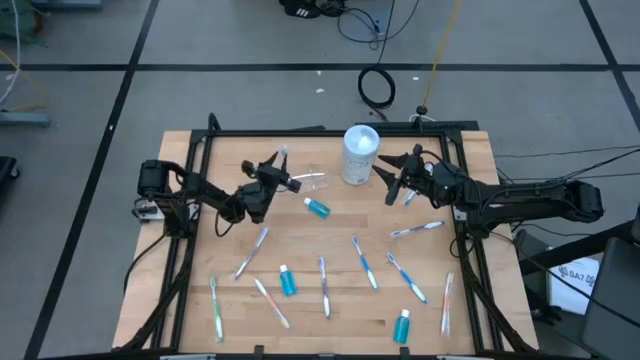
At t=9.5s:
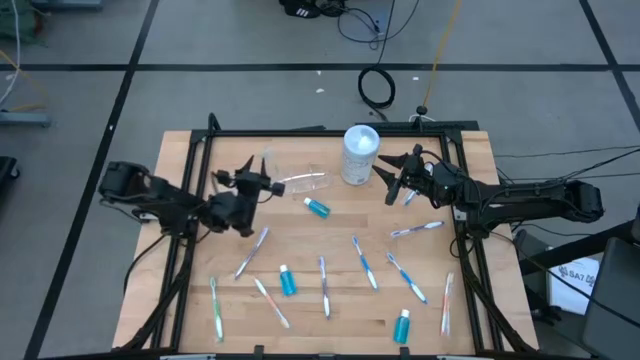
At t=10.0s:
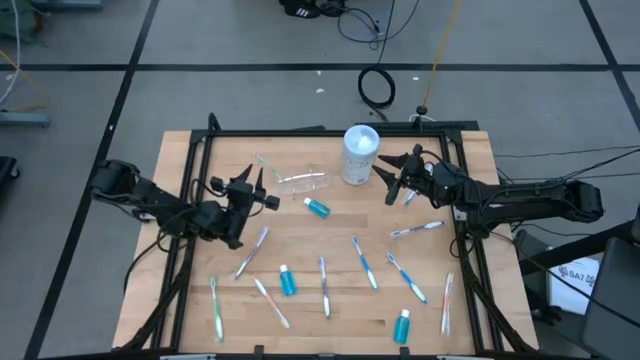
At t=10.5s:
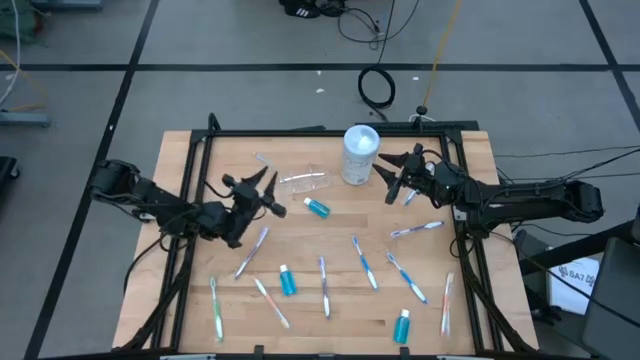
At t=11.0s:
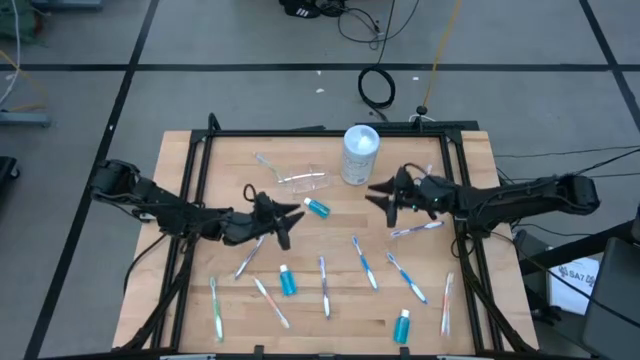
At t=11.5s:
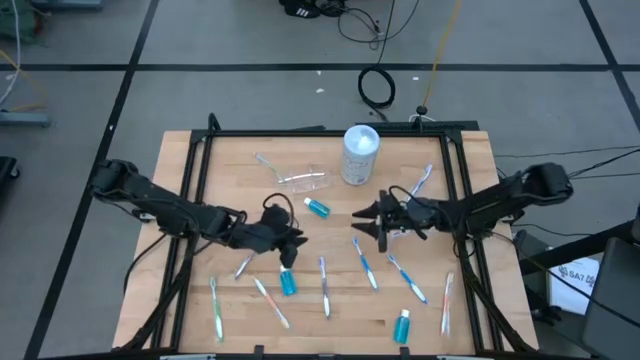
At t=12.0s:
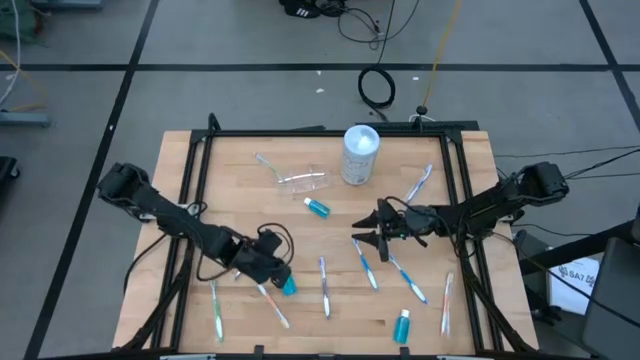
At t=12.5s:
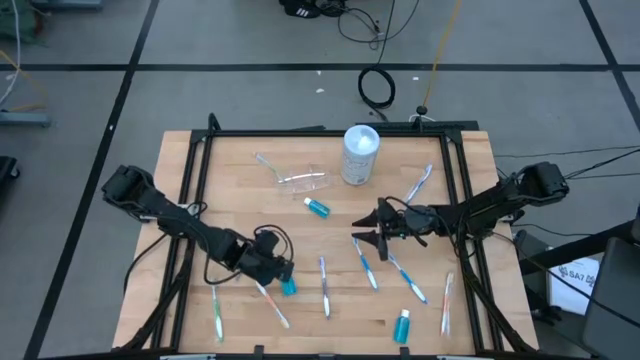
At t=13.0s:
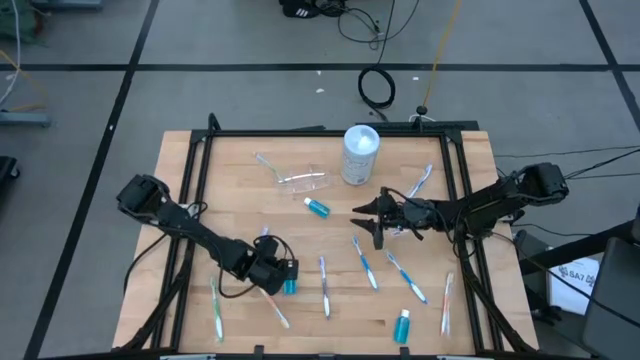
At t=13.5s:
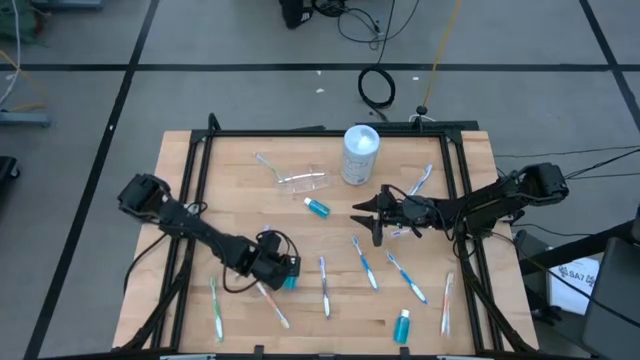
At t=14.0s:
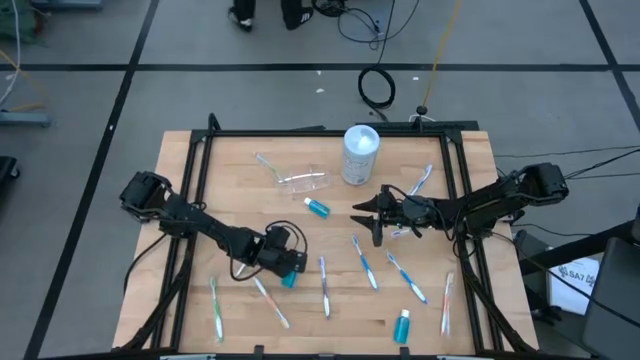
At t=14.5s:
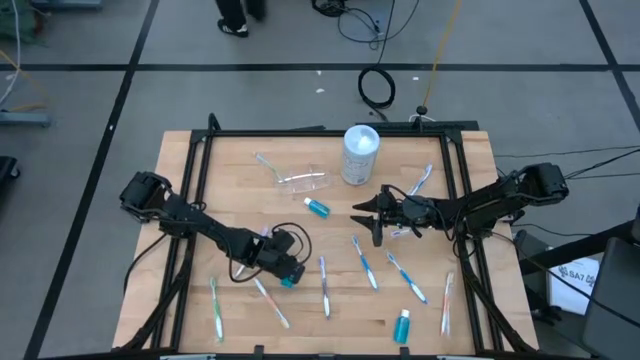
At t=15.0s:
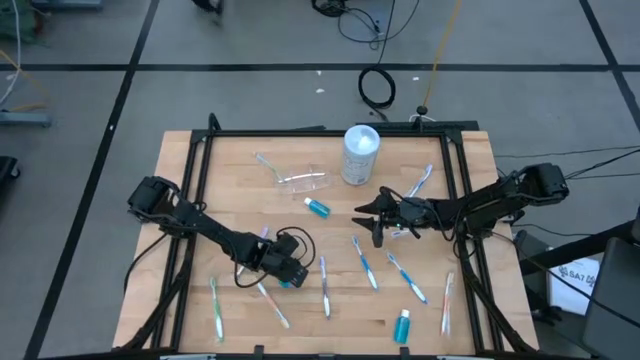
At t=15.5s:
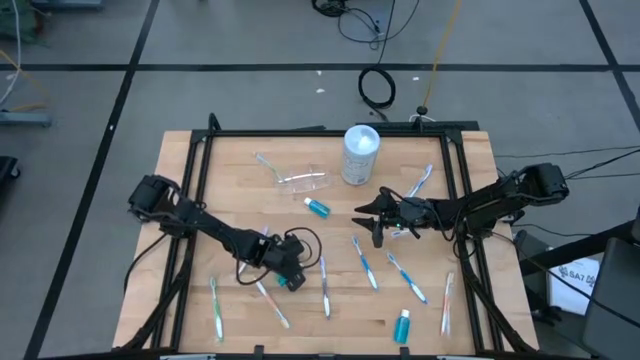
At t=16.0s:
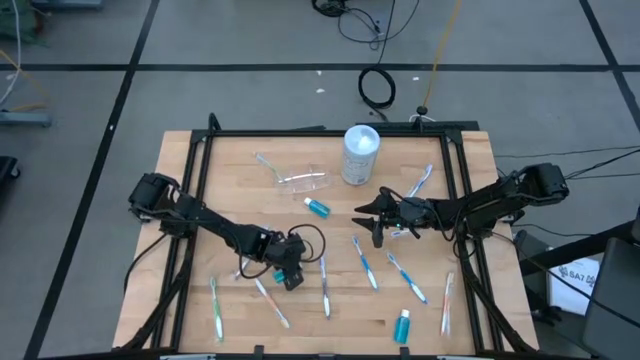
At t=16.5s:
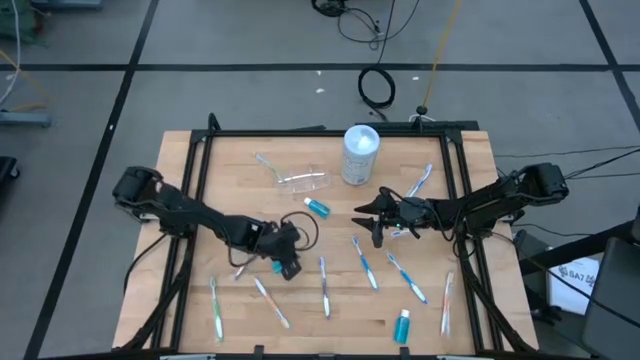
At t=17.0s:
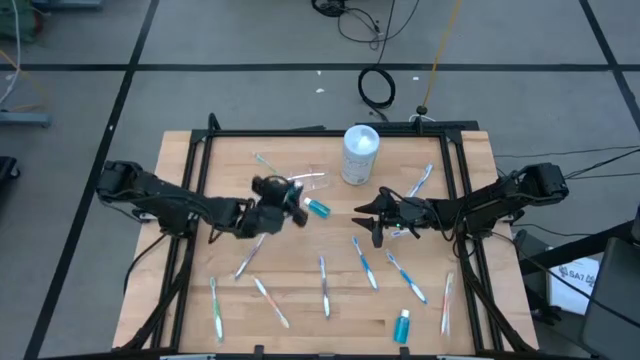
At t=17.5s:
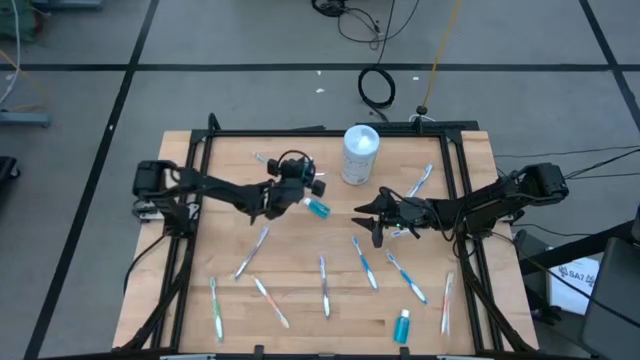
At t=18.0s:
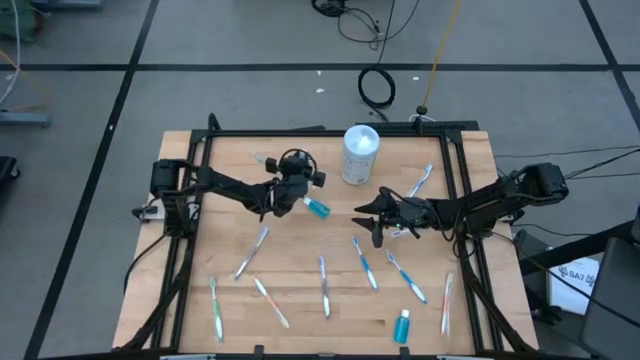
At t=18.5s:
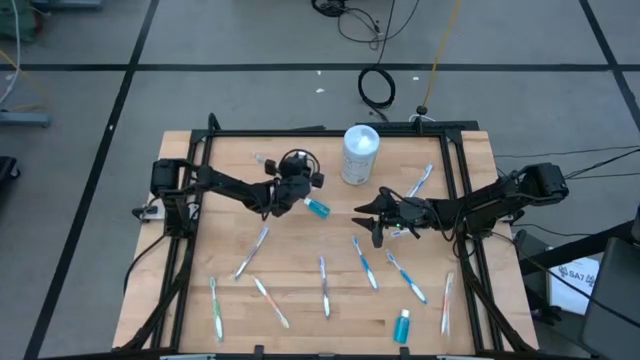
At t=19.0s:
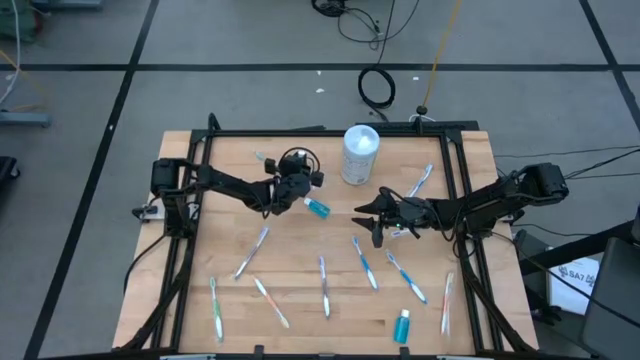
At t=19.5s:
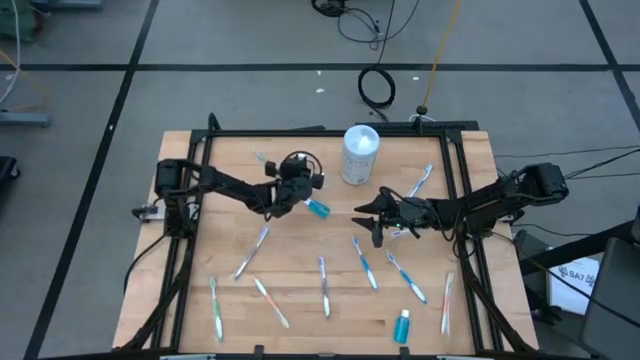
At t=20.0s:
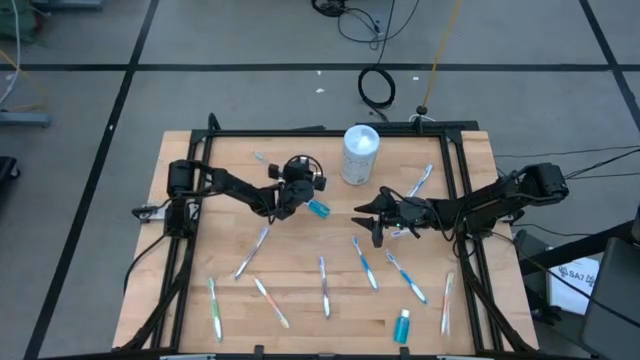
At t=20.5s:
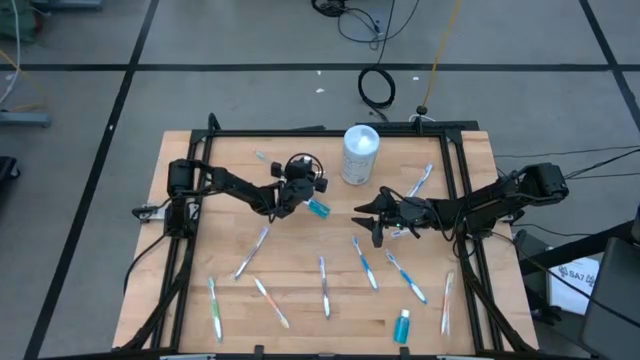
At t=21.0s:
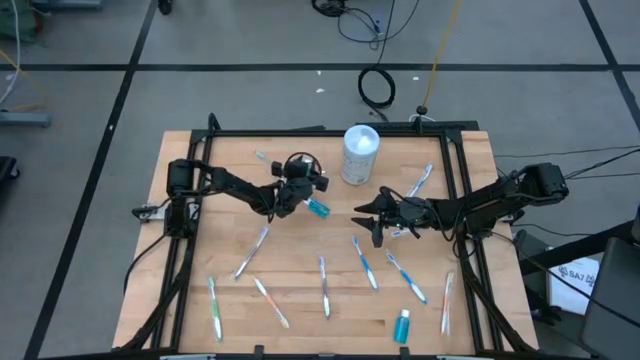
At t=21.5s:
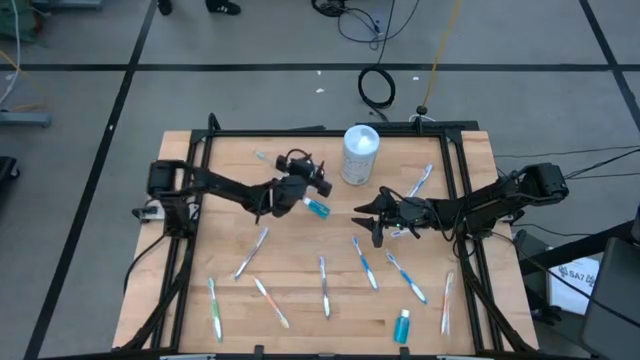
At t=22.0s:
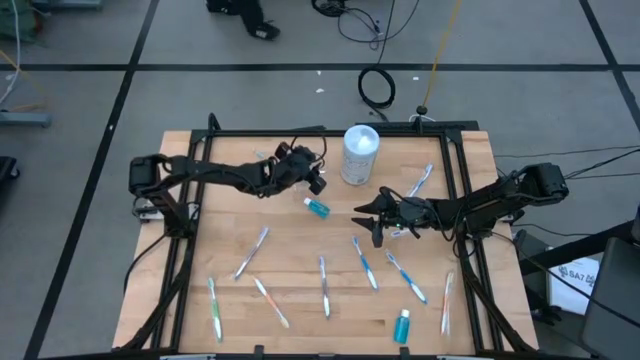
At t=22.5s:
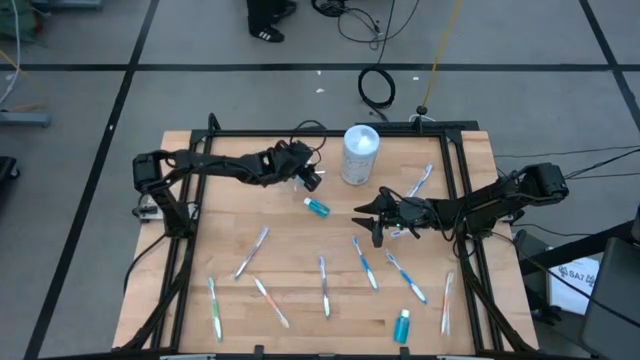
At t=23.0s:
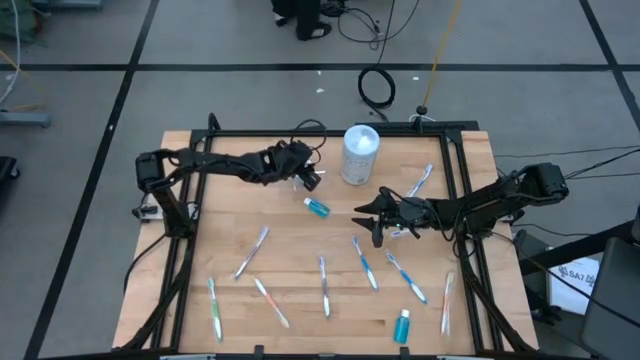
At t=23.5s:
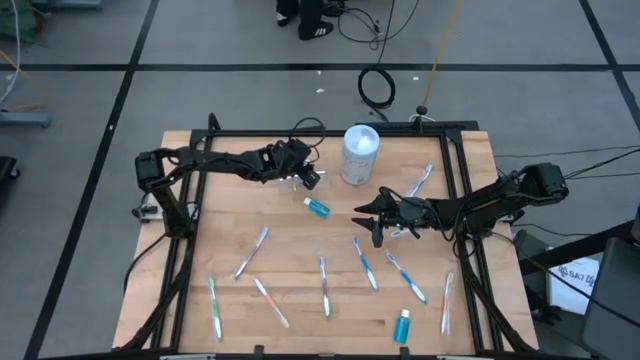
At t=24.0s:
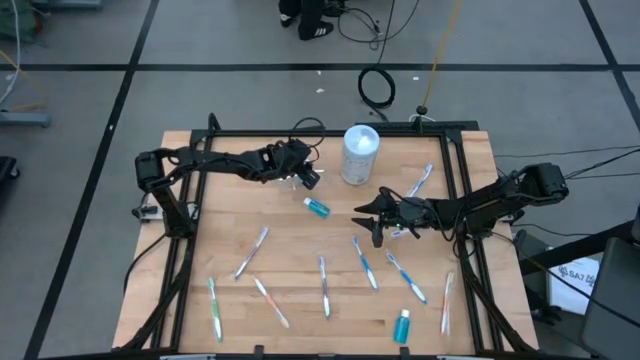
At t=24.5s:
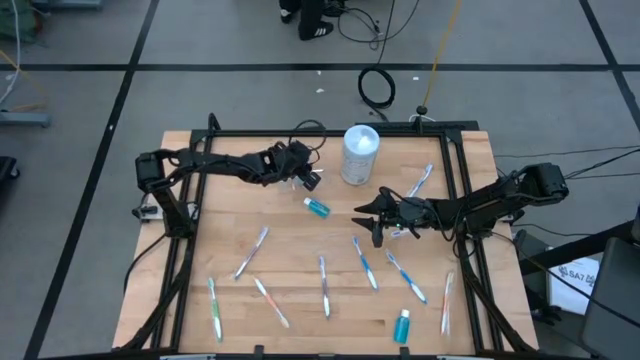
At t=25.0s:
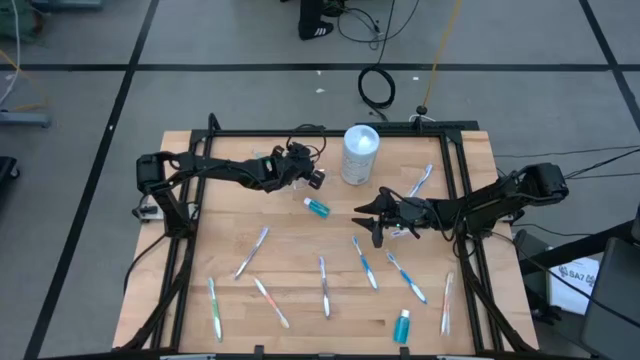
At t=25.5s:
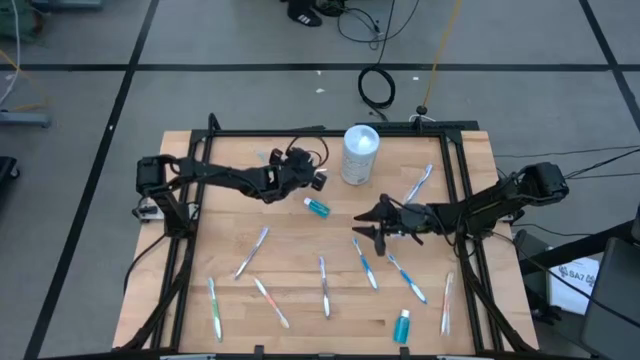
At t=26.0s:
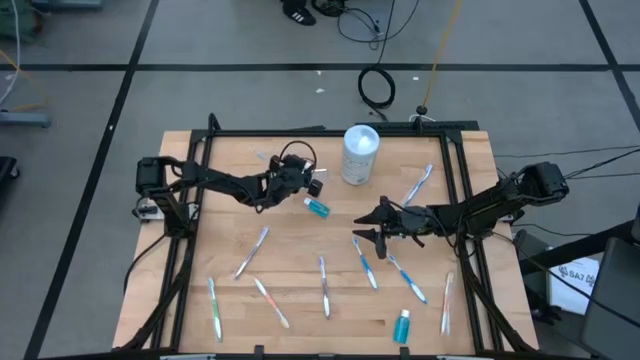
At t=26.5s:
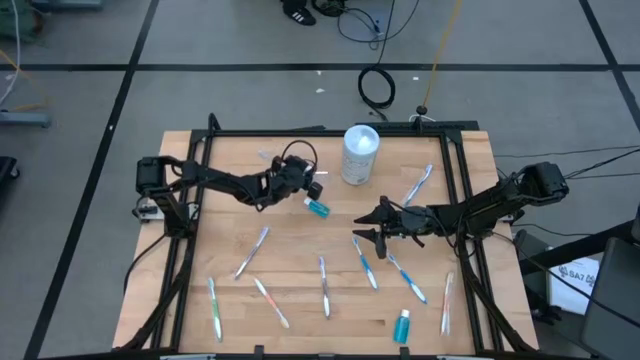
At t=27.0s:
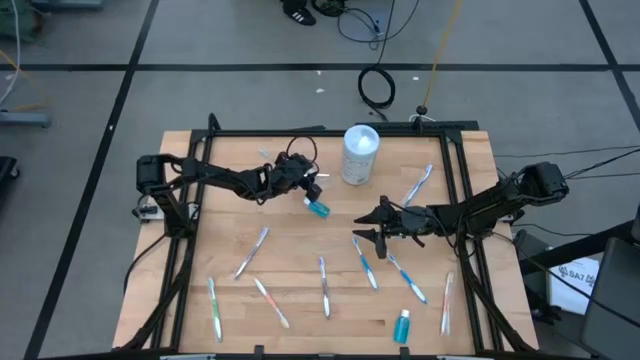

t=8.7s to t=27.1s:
Task: Pick & Place toothbrushing station
Put the middle mouthwash bottle in the middle compartment of the transparent organizer

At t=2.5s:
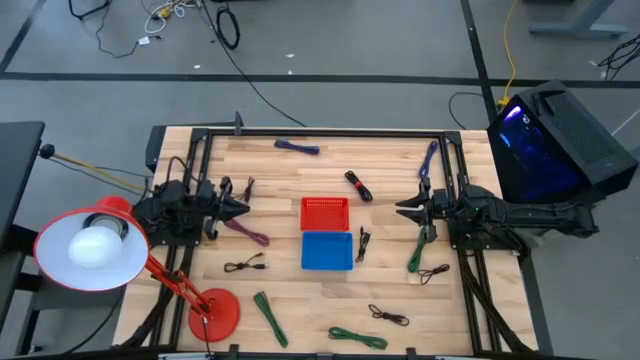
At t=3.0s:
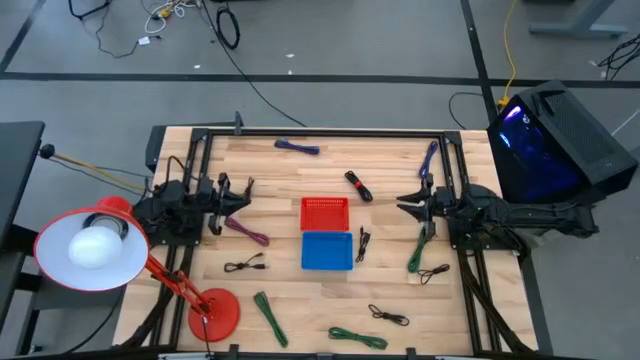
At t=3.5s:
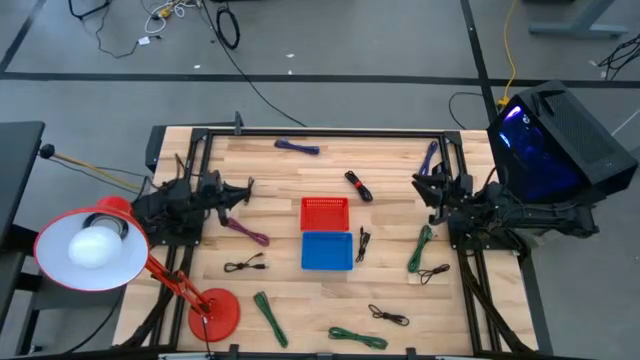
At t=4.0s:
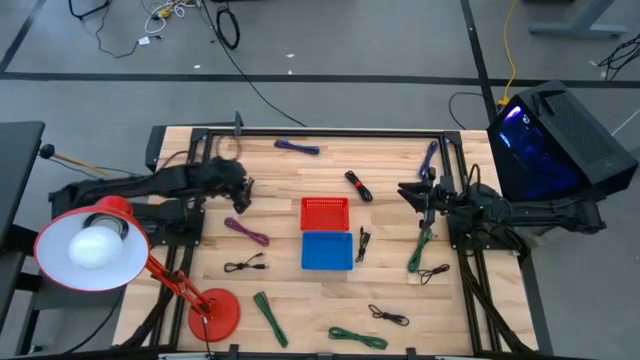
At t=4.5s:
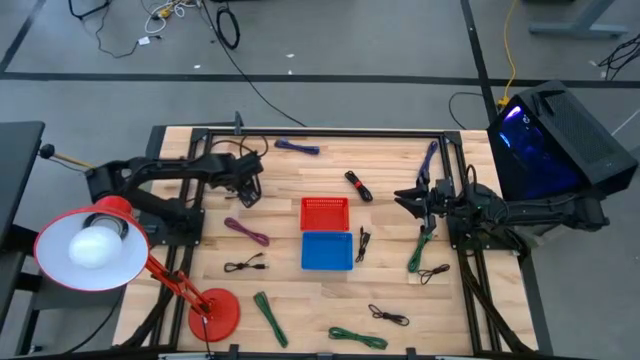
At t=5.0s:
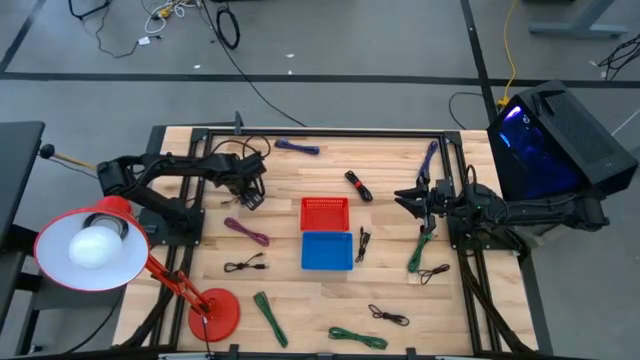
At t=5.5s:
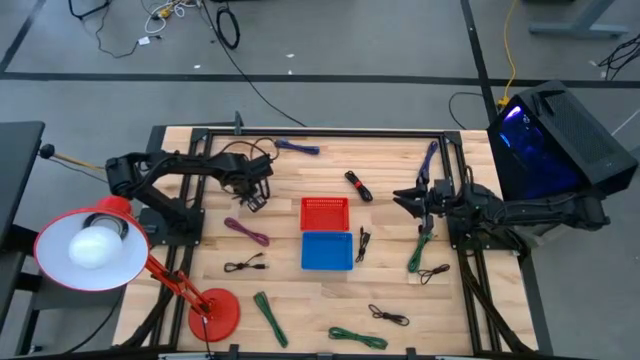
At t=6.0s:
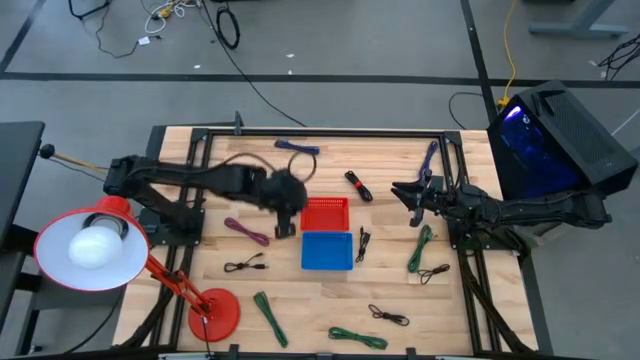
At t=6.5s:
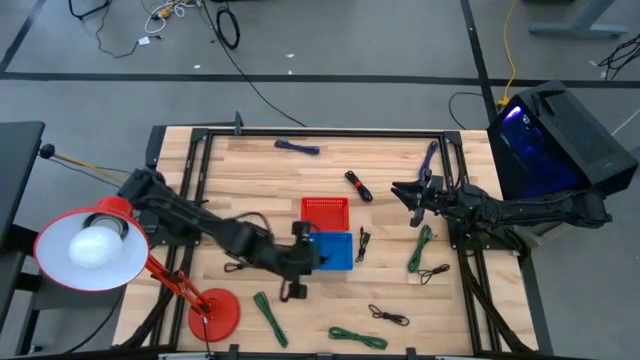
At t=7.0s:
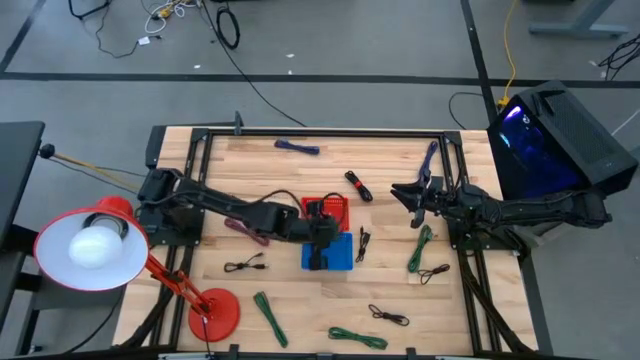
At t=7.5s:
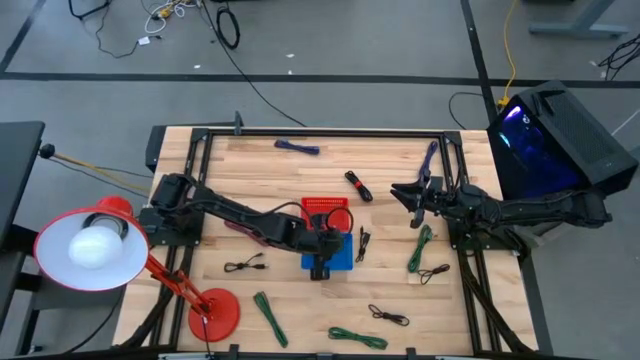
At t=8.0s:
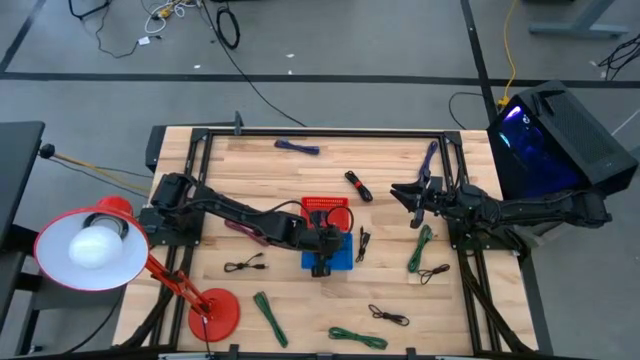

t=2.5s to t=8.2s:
Task: Pick & Place USB Port
Put the black charger cable into the blue bin
